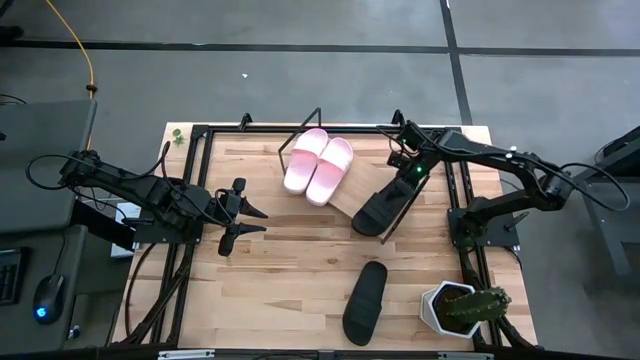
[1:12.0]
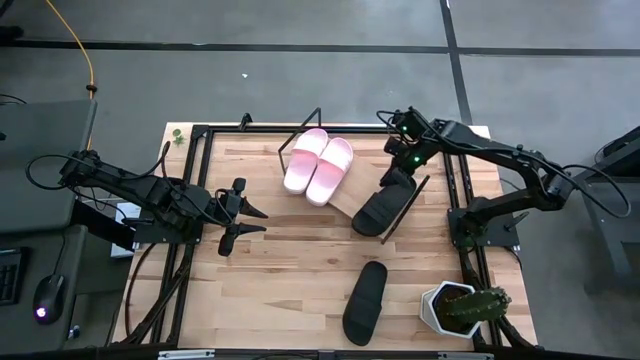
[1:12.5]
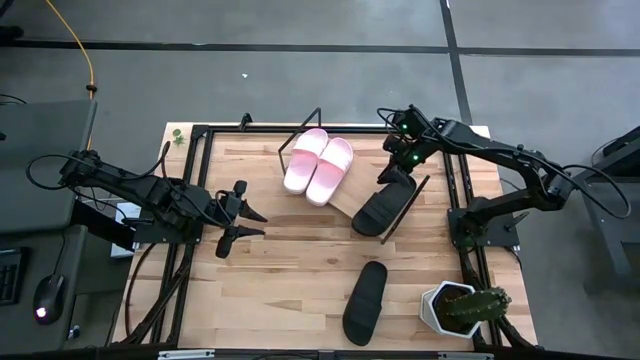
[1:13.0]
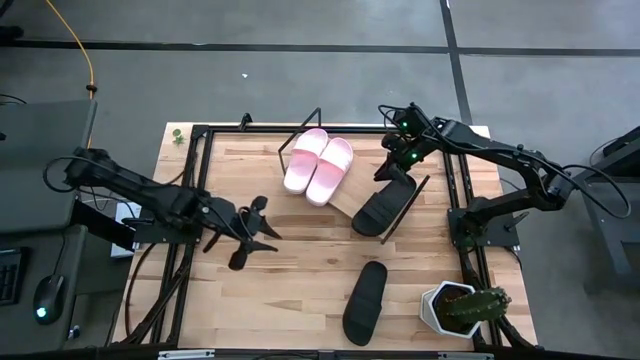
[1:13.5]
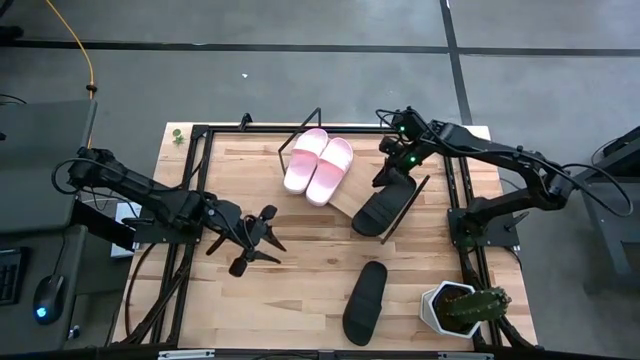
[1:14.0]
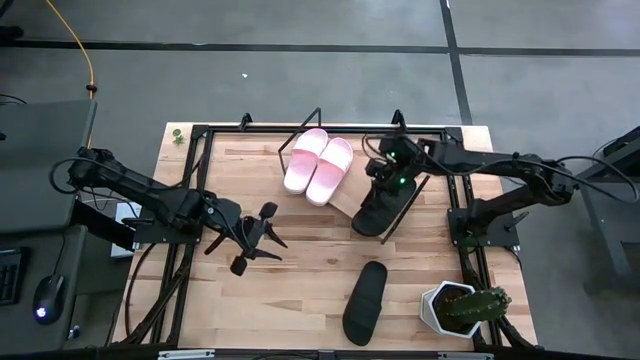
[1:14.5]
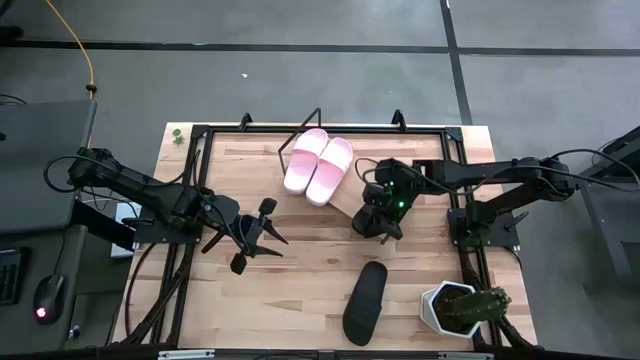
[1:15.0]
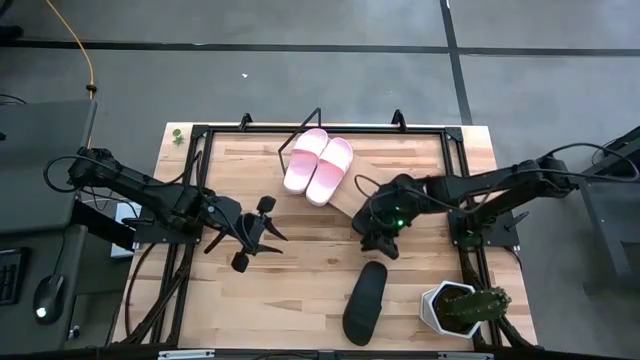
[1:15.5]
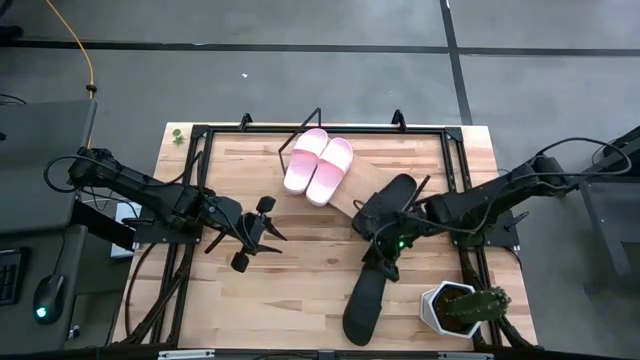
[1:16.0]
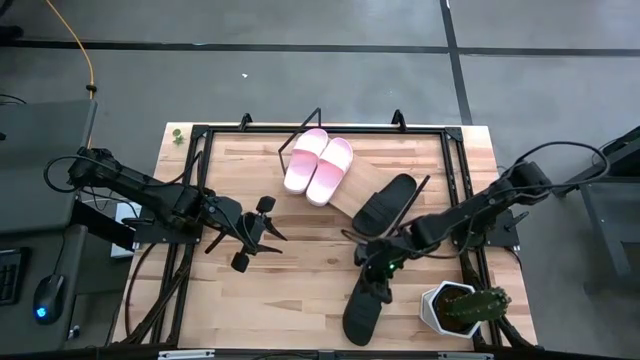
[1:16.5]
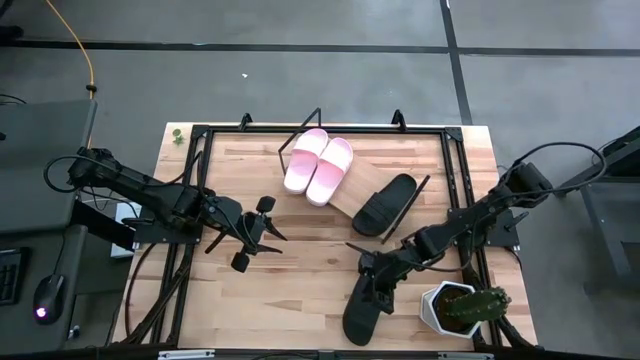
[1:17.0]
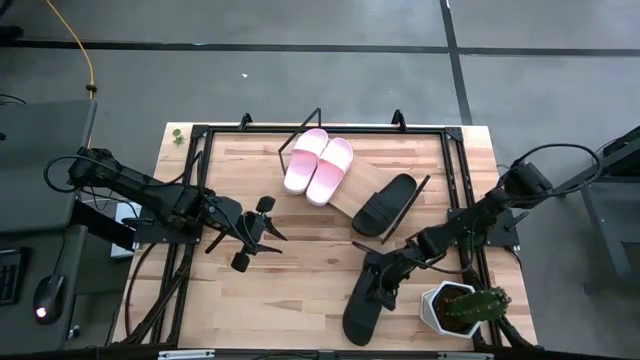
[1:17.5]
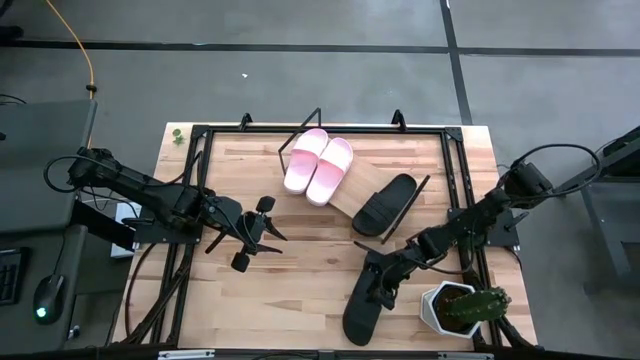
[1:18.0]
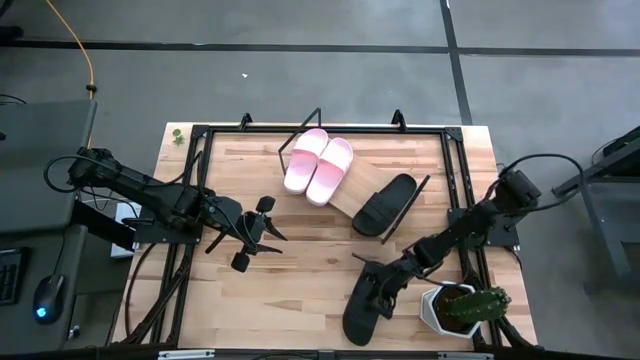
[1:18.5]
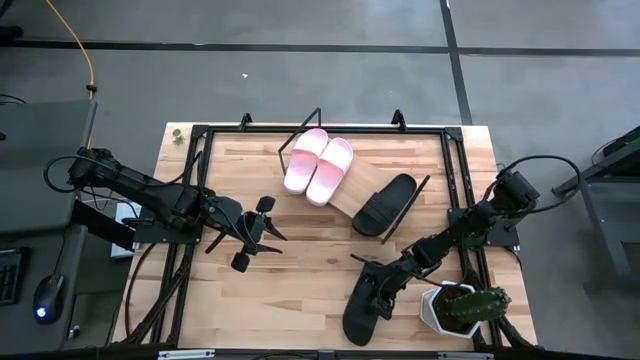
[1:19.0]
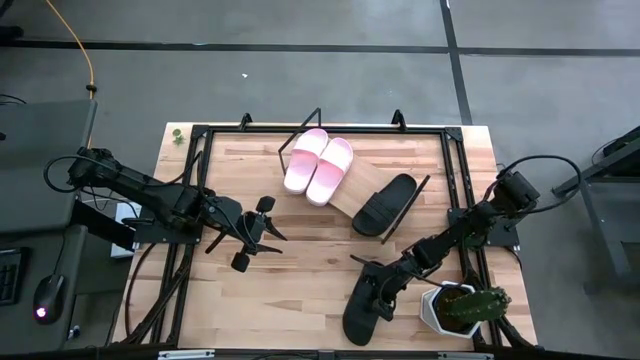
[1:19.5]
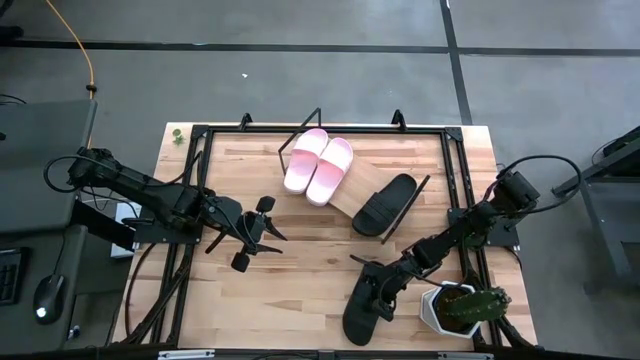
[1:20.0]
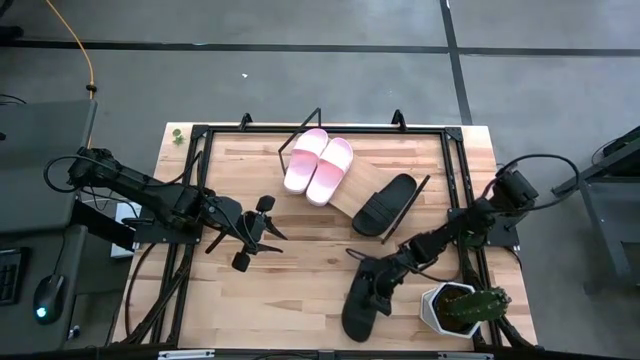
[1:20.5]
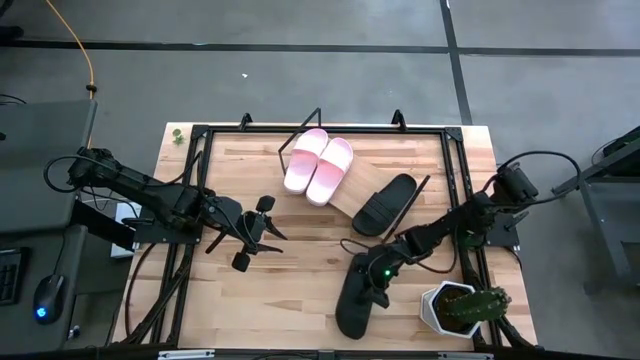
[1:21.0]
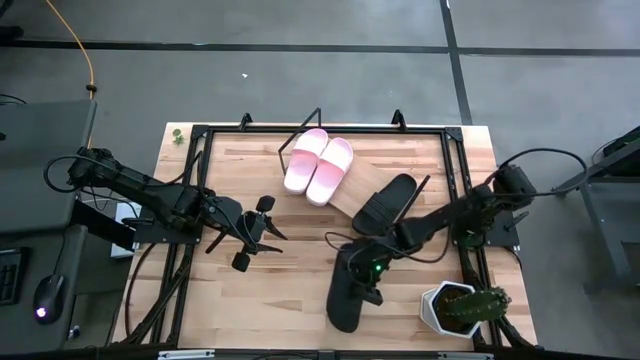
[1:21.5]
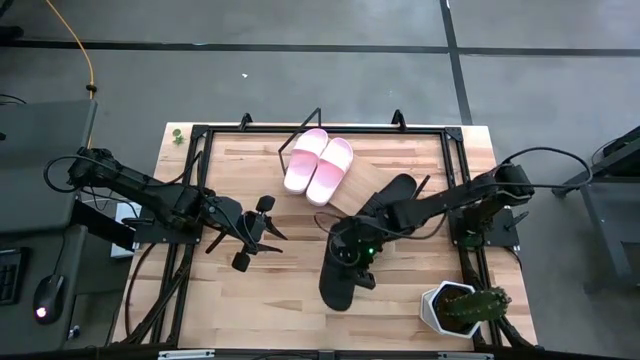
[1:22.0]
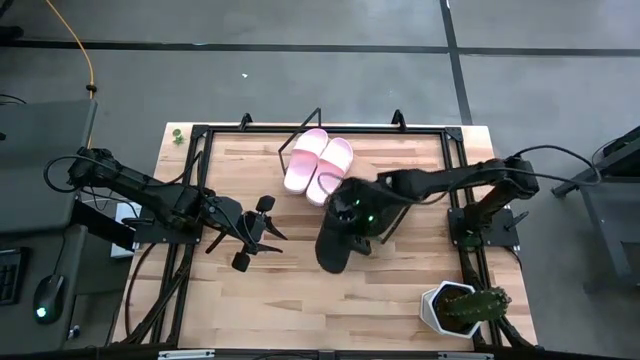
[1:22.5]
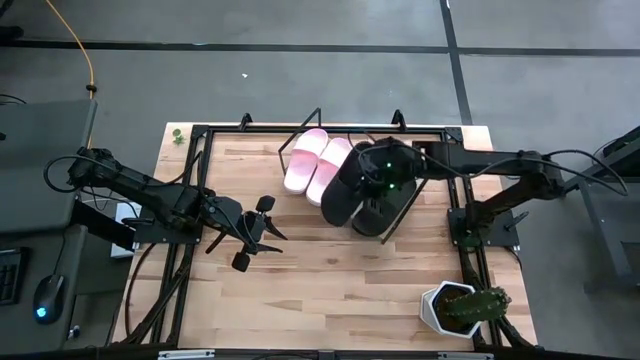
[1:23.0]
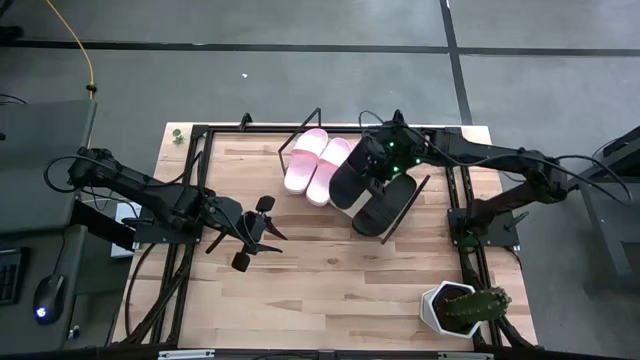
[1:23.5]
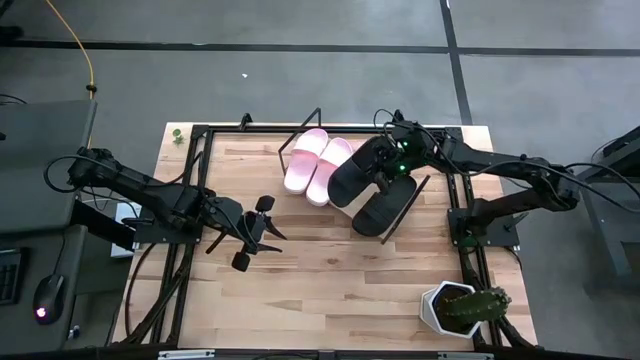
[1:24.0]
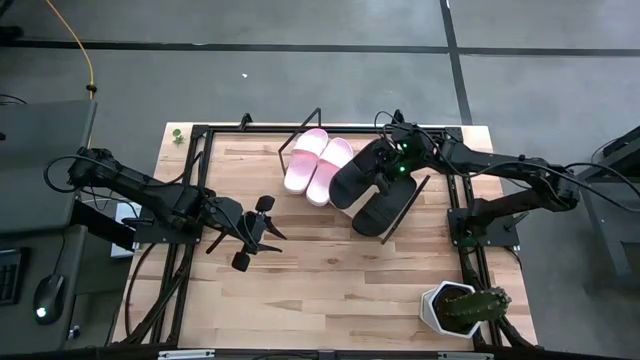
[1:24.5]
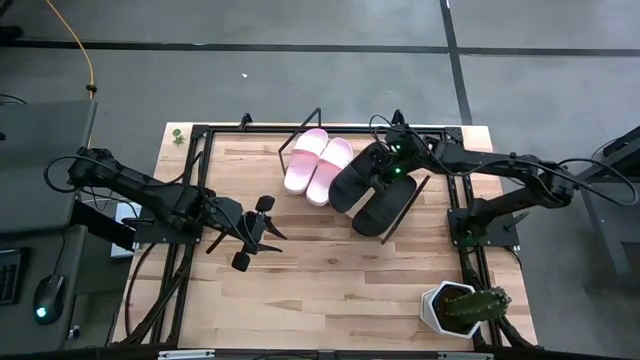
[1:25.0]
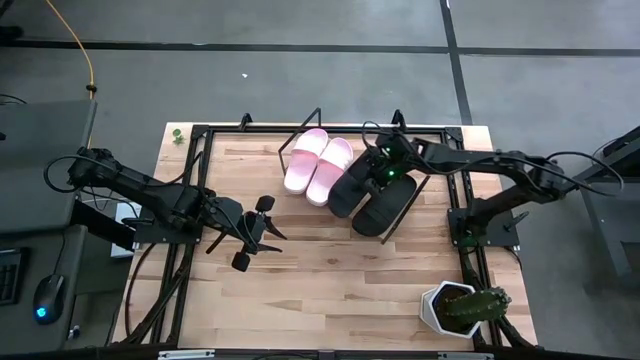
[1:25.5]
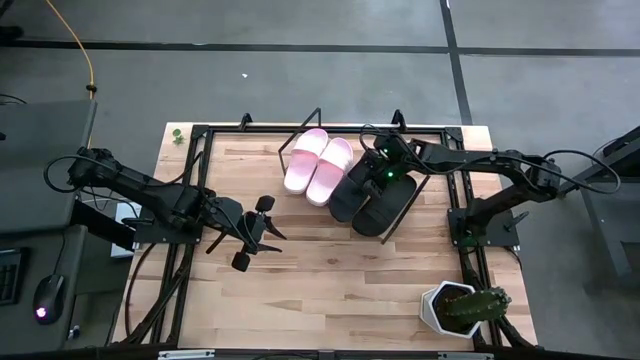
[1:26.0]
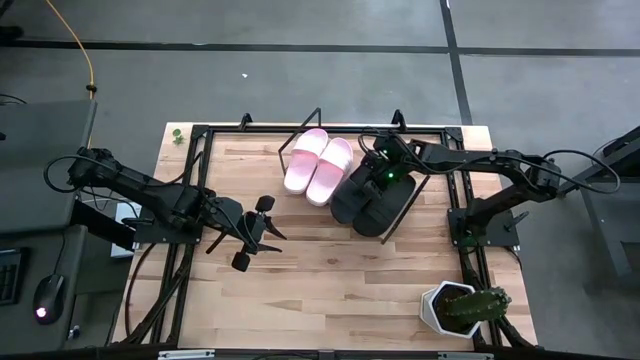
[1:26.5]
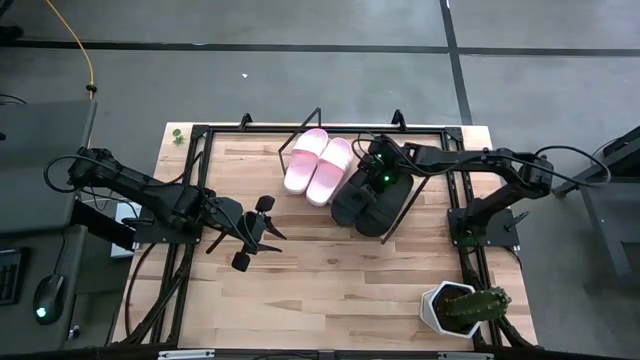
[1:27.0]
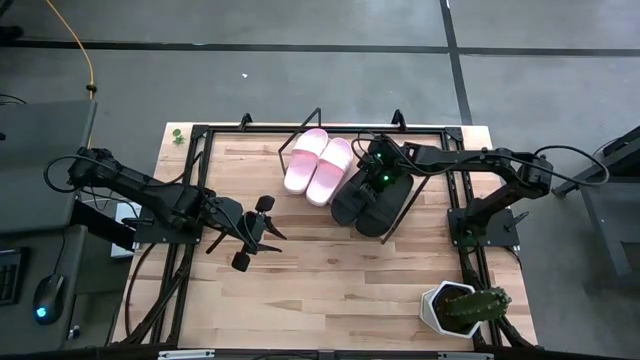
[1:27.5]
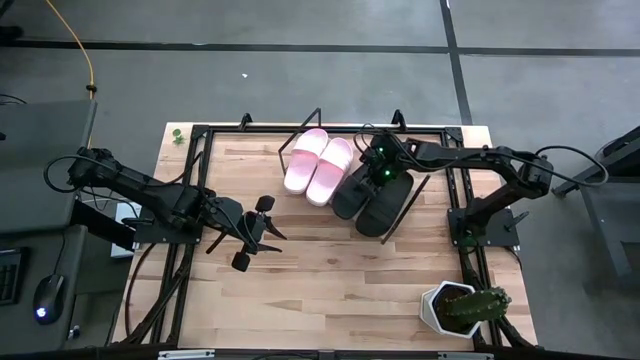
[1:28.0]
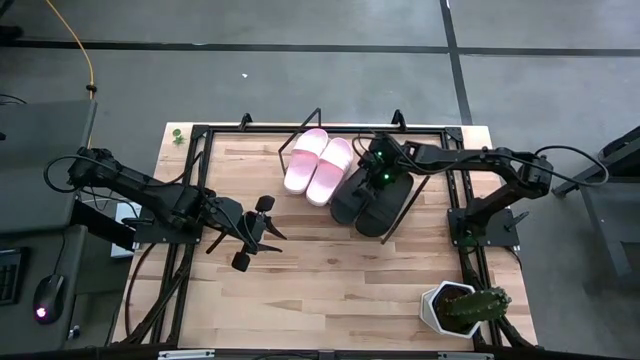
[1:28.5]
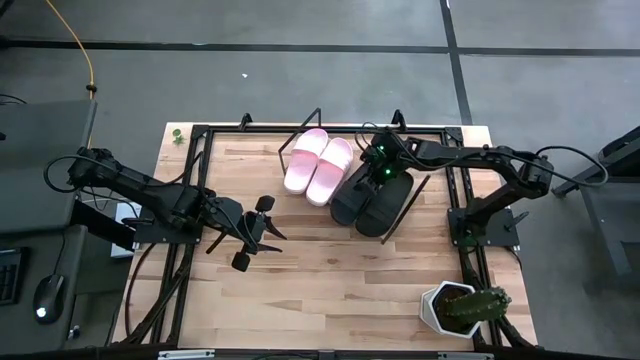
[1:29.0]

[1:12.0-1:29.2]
Task: Pick and place slides into the shelf
Put the black slipper on the shelf

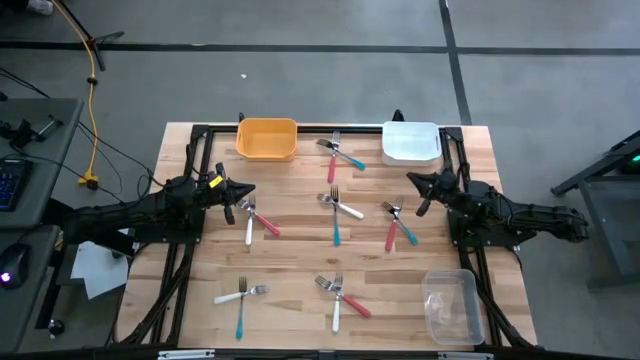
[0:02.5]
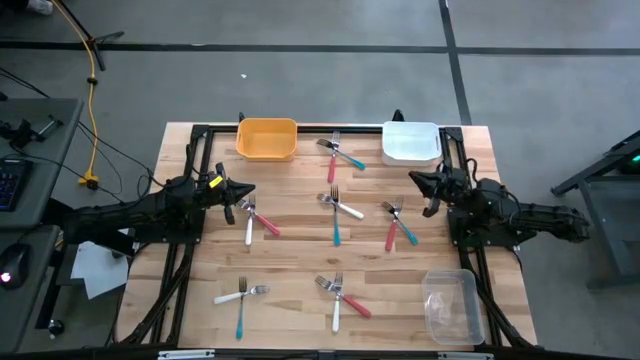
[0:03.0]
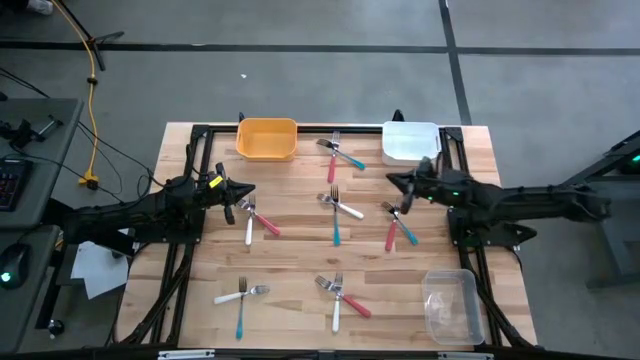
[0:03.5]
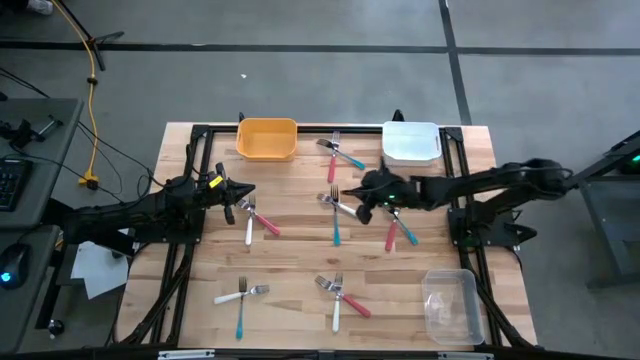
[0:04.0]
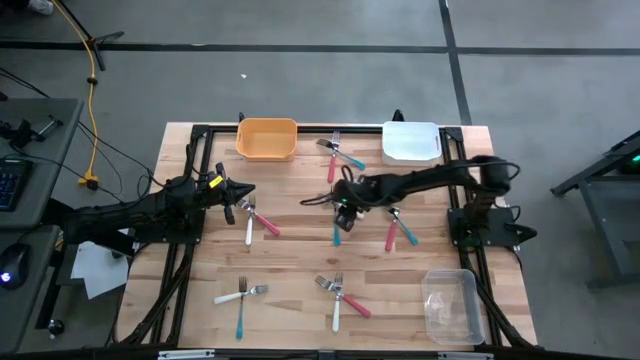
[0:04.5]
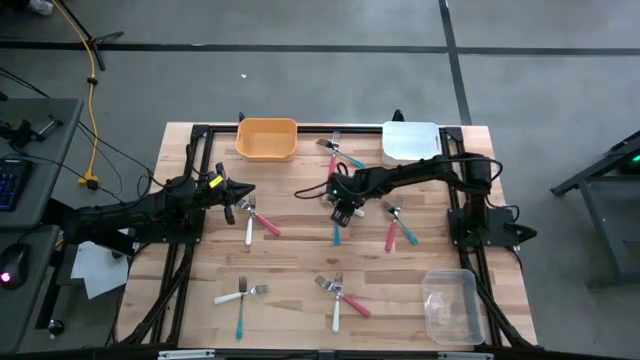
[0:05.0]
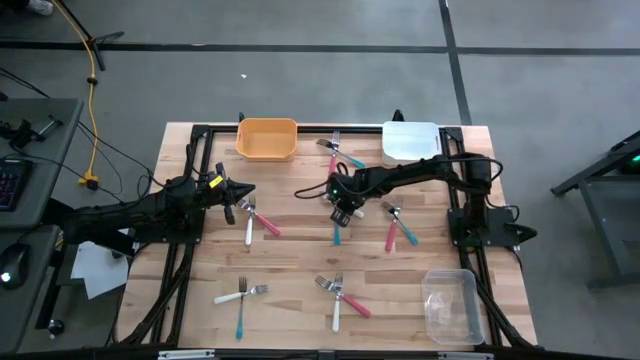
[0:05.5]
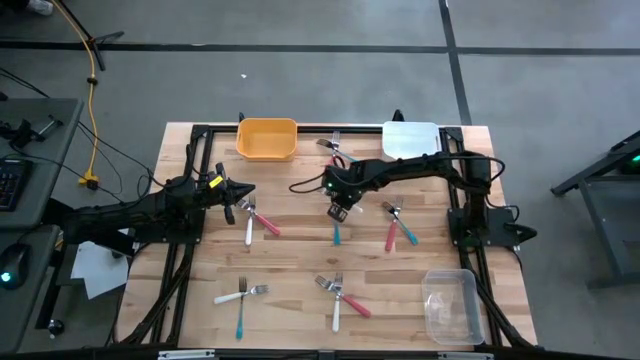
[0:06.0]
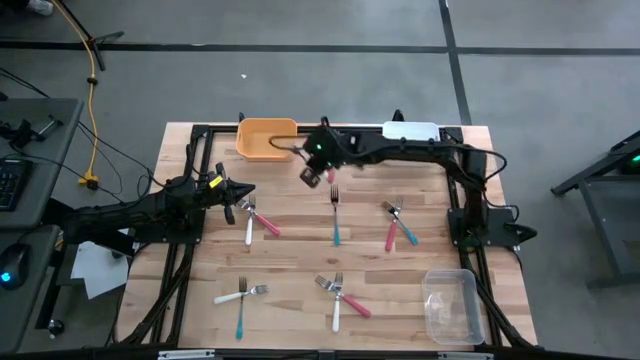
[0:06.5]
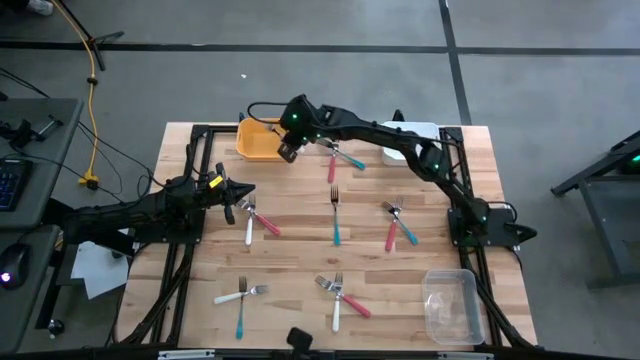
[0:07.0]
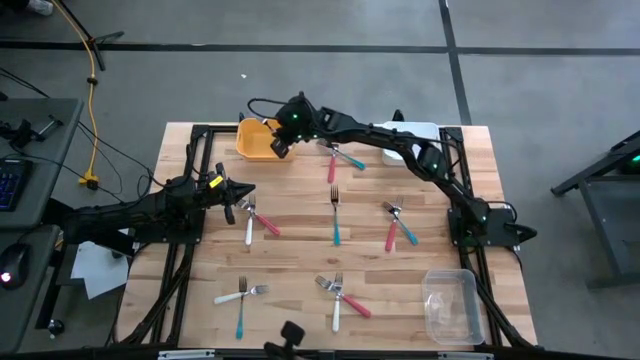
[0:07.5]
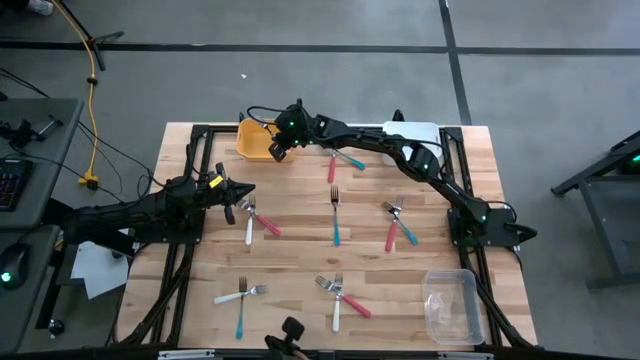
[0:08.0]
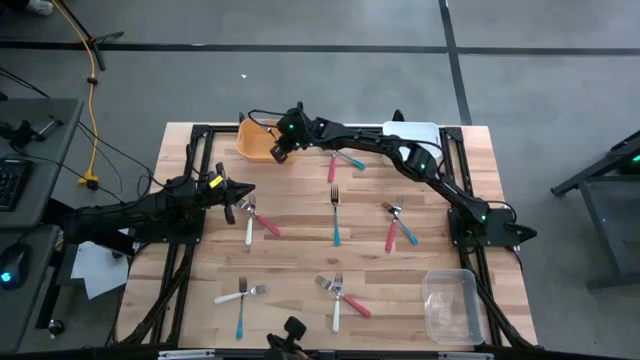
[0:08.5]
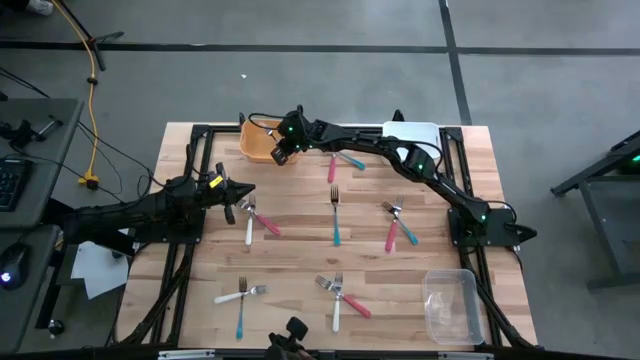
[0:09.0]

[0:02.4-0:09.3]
Task: Sort silverware by color (type)
Put the top right white fork into the yellow bin
